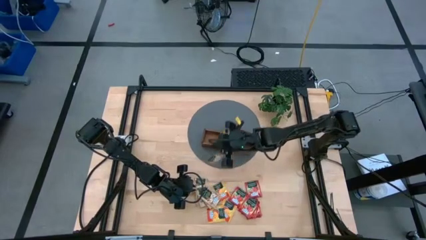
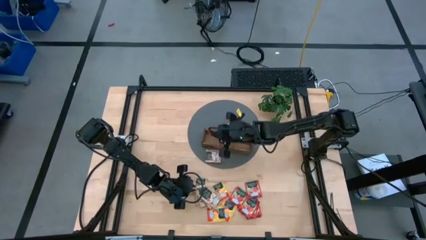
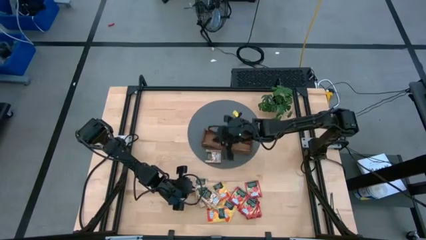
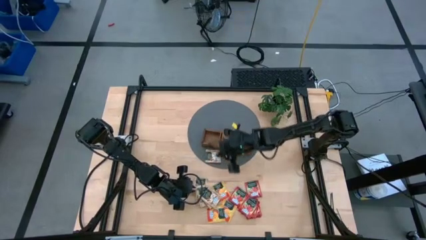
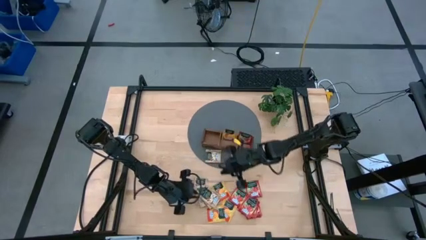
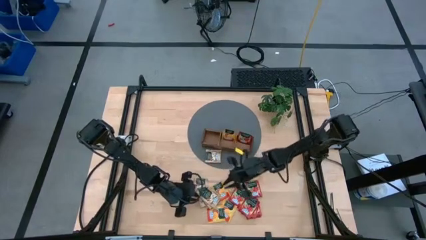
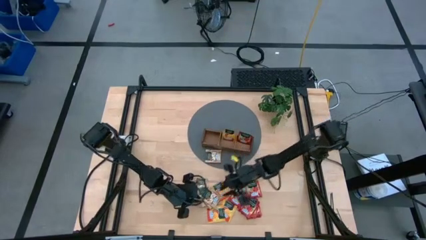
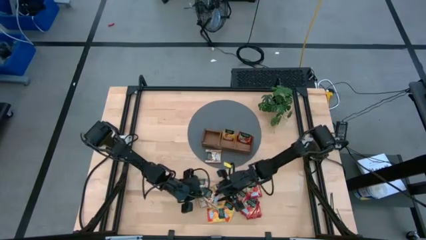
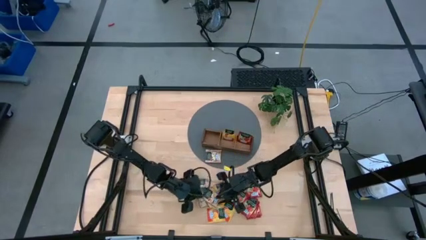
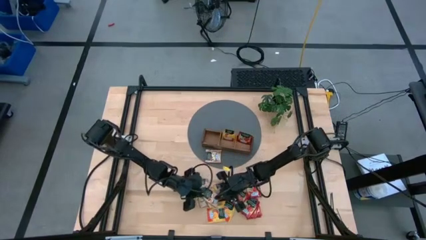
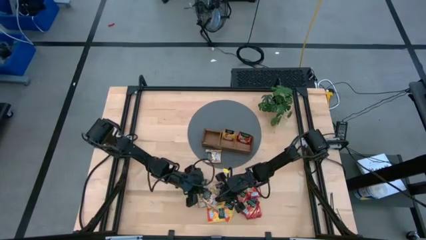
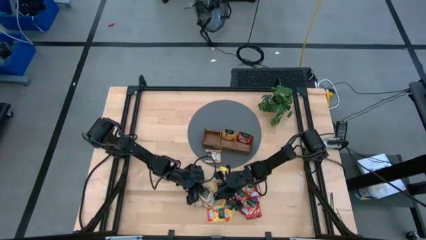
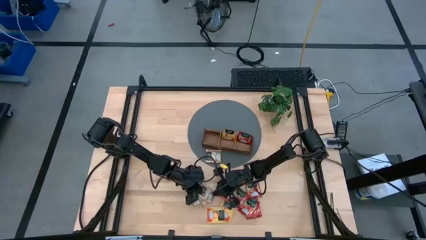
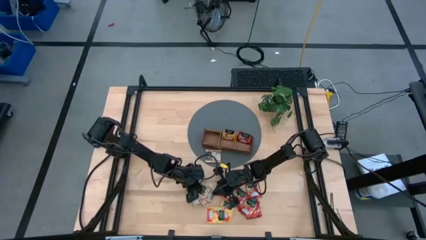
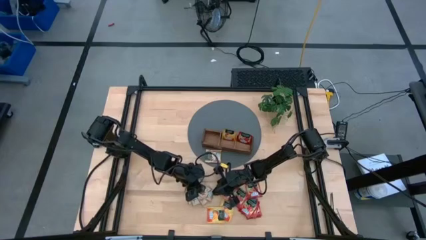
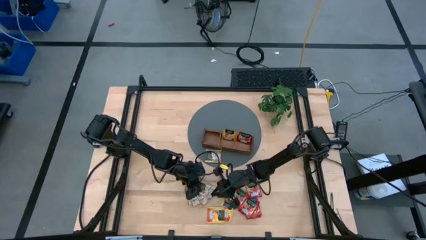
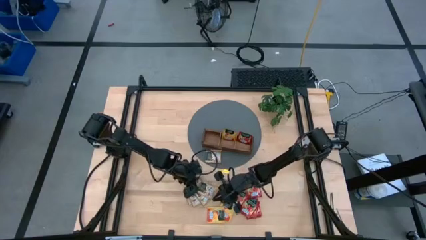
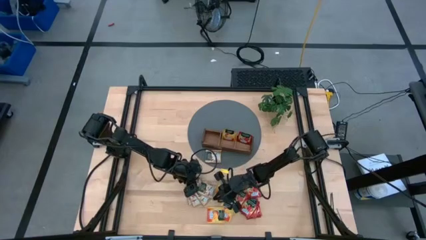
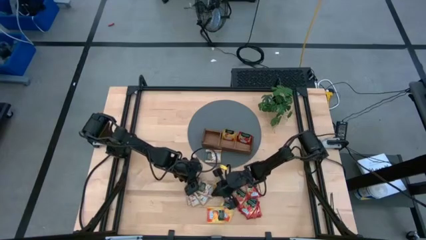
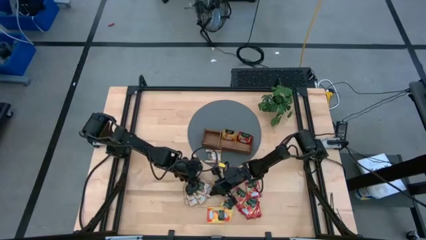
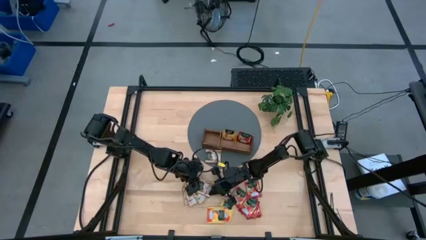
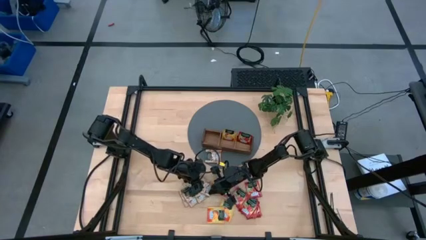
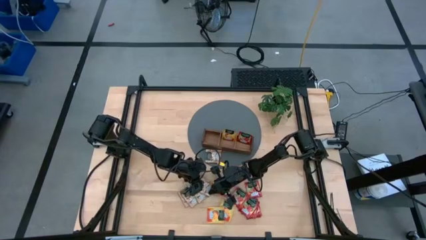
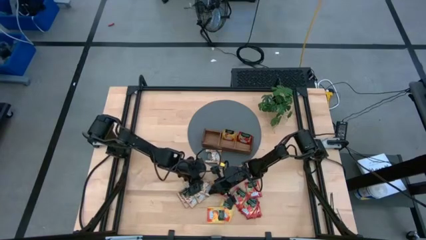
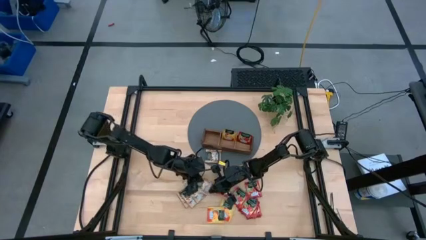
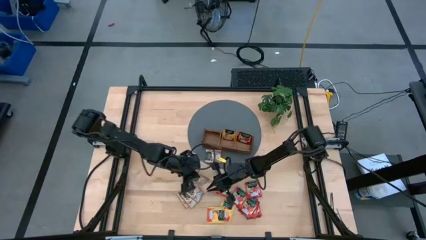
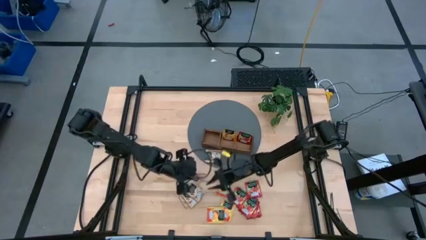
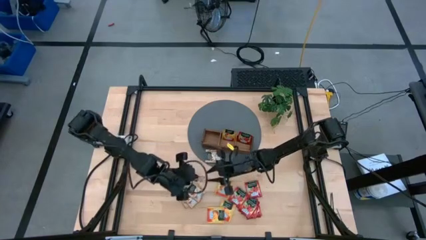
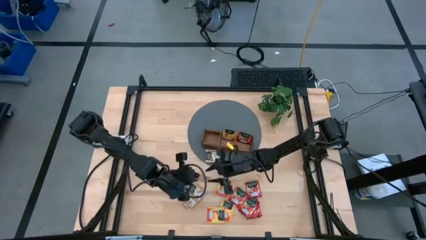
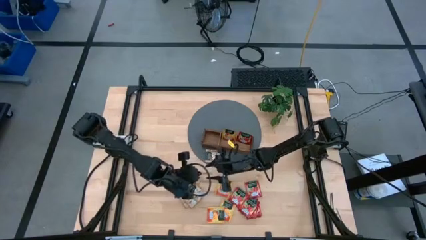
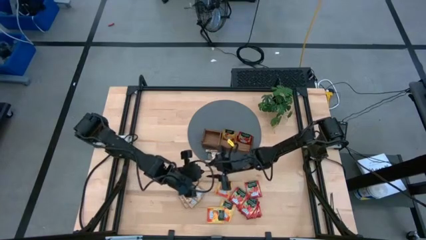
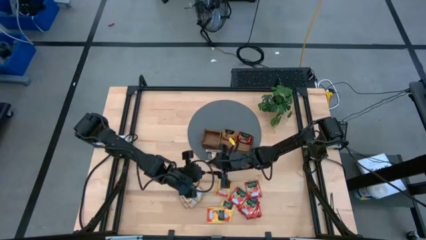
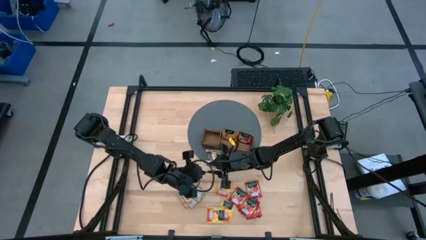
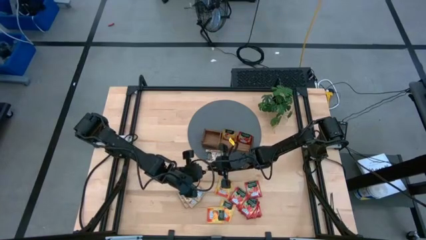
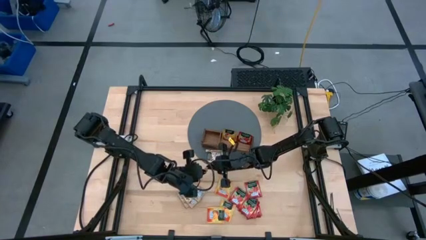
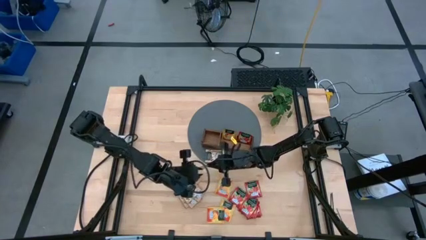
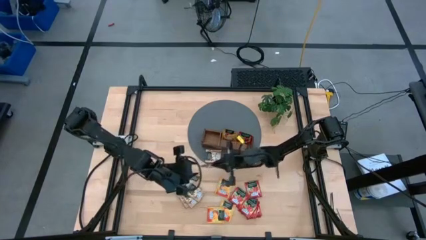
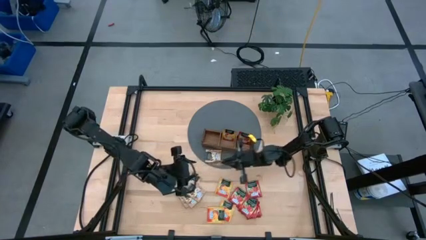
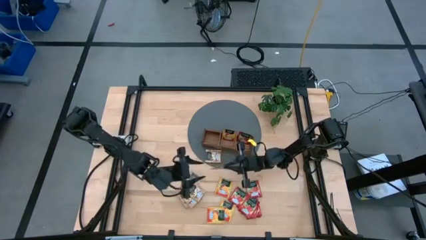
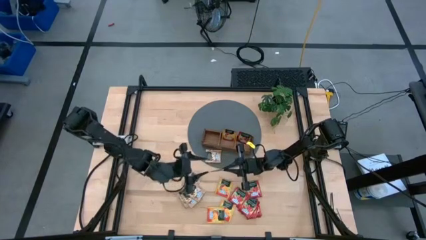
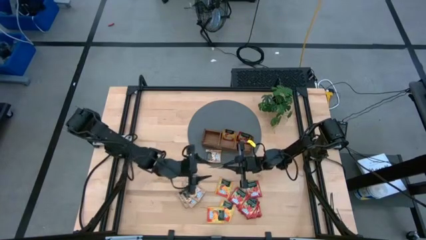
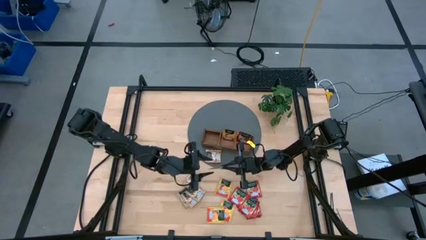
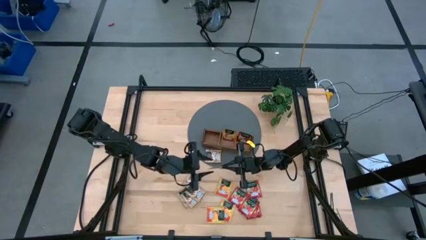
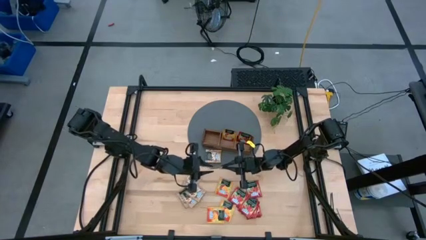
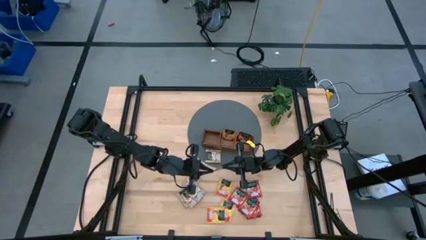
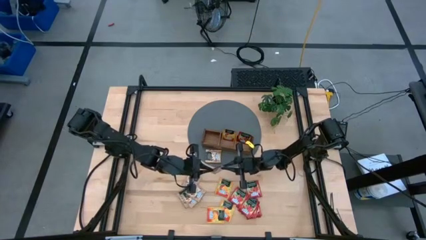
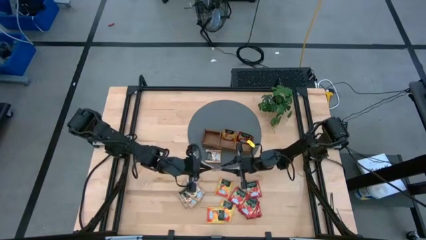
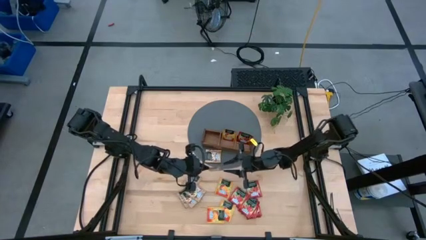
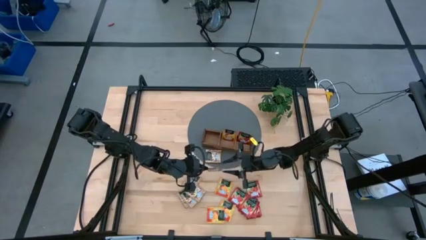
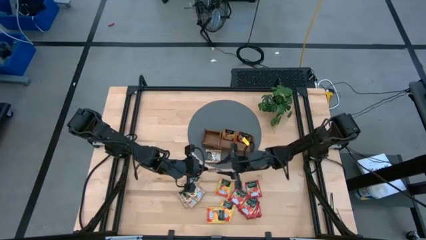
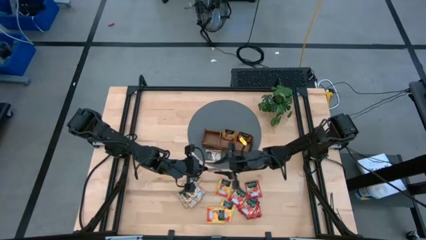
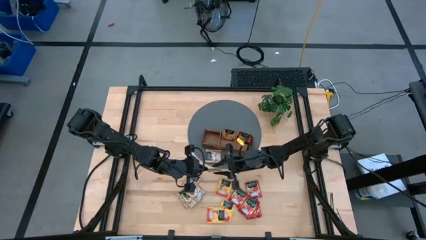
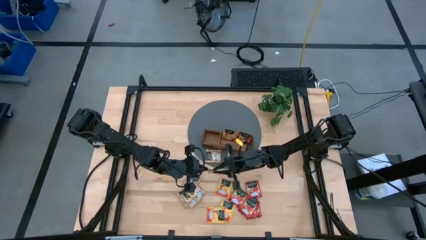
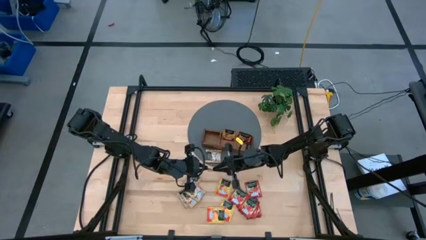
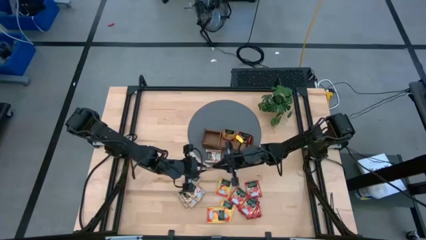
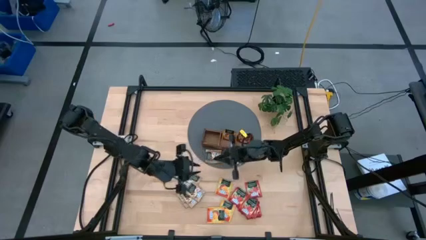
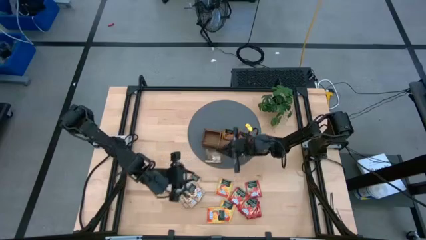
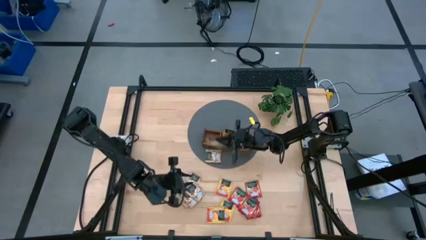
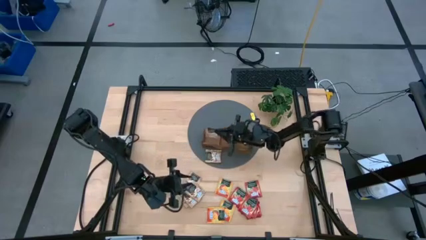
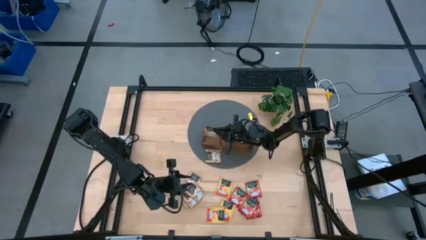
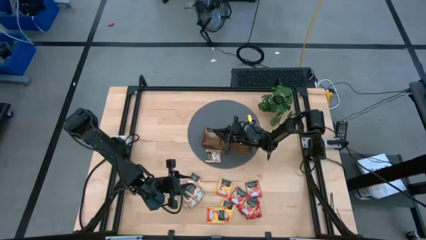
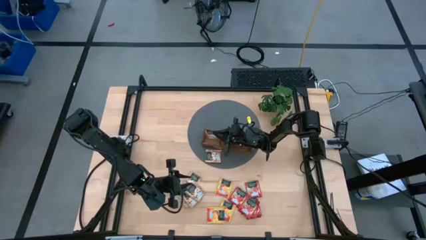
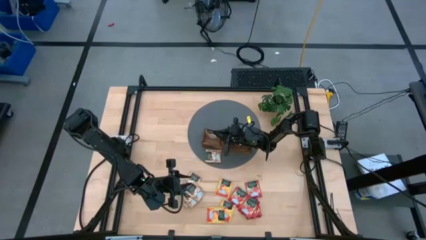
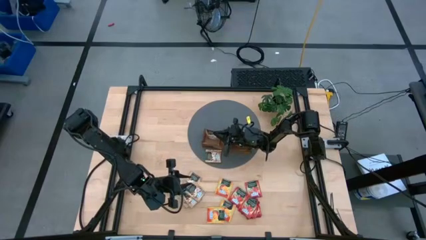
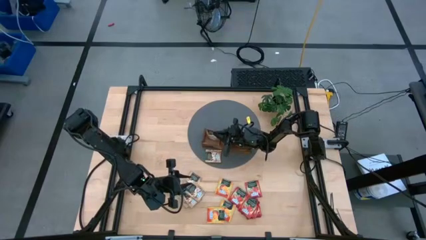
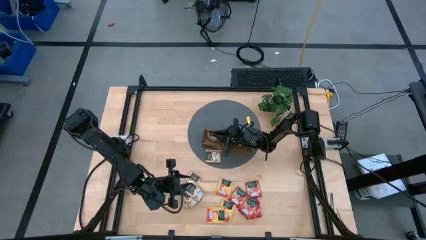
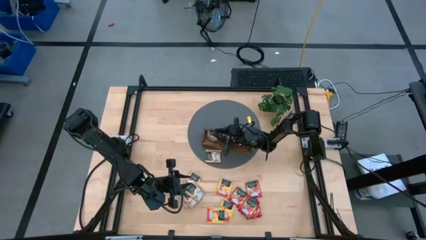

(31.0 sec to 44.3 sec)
Task: Pick & Place Tea
Put the brown tea packet into the left section of the wooden organizer

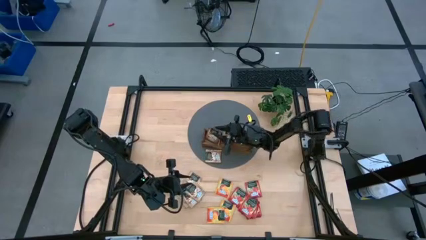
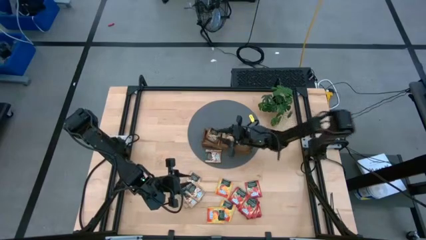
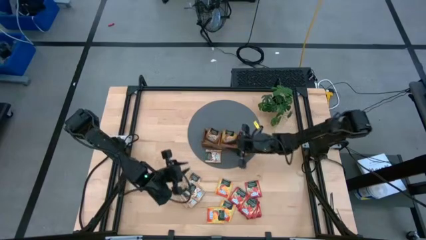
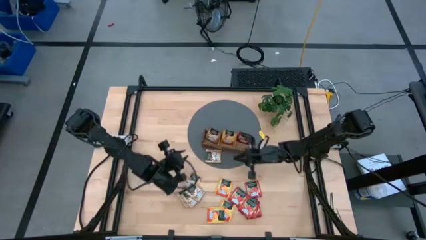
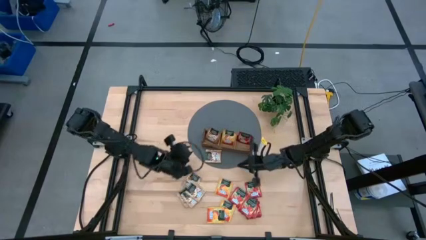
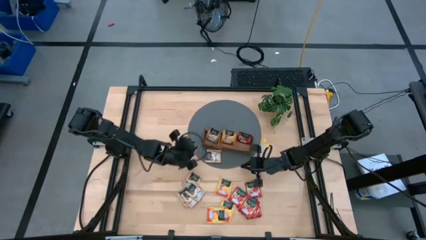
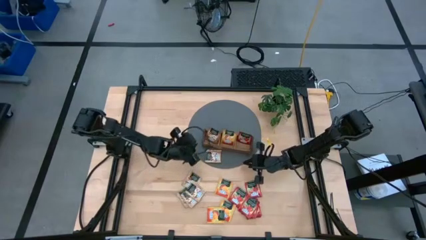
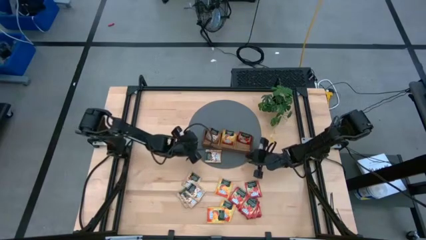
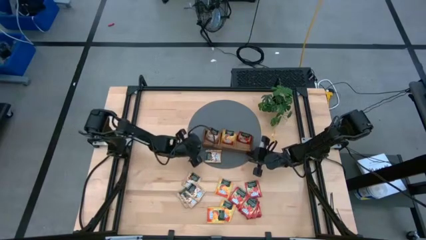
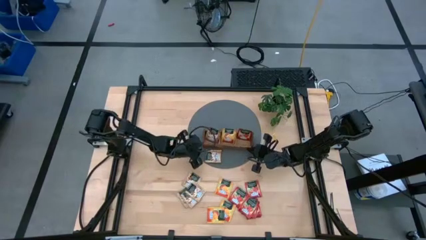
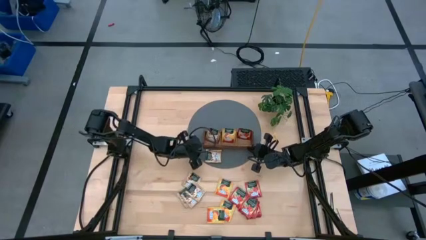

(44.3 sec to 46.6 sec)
Adjust the wooden organizer to align the position

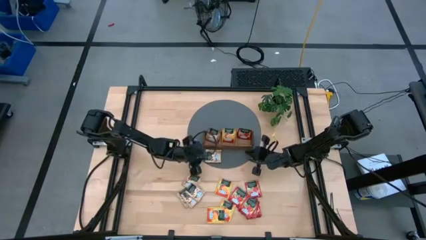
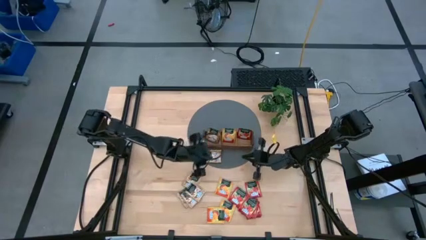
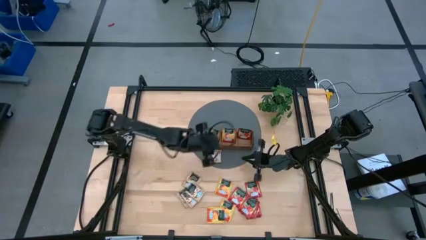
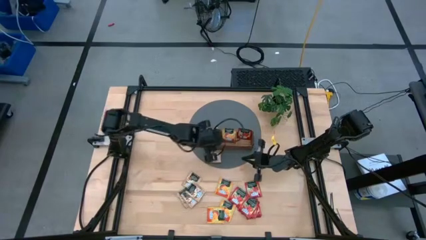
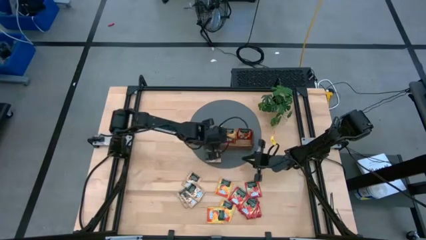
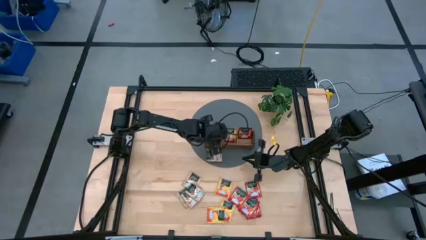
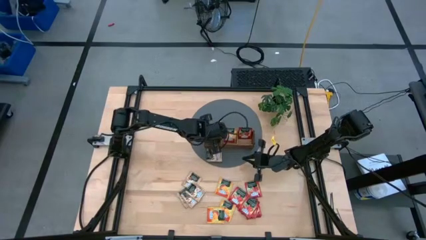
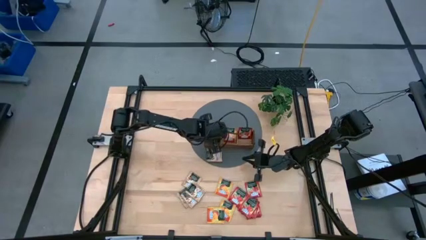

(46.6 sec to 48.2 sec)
Adjust the brown tea packet in the wooden organizer to align the position
